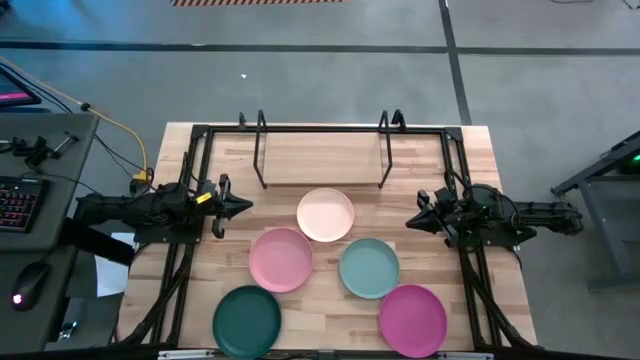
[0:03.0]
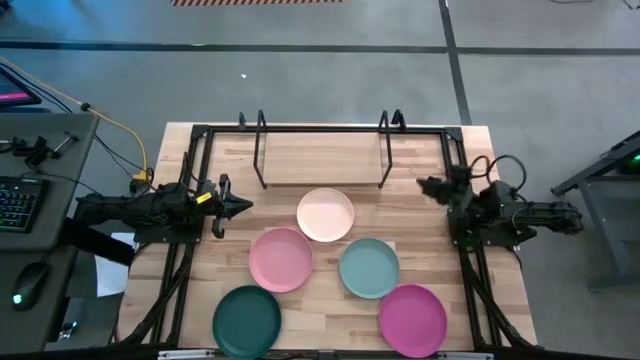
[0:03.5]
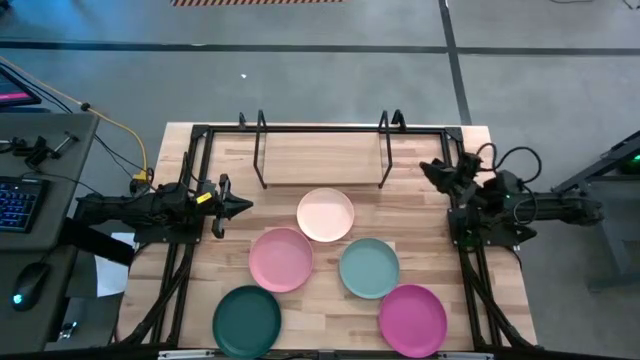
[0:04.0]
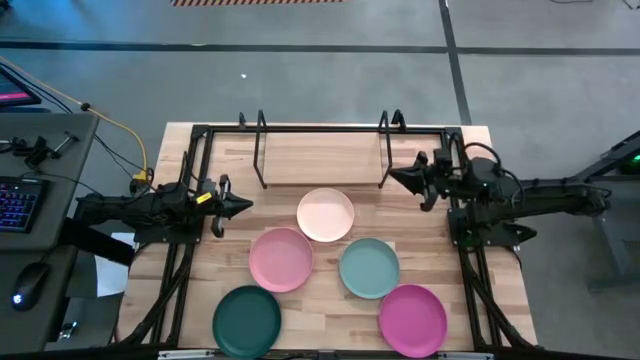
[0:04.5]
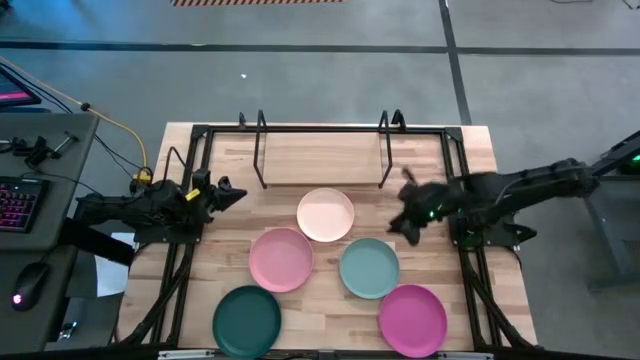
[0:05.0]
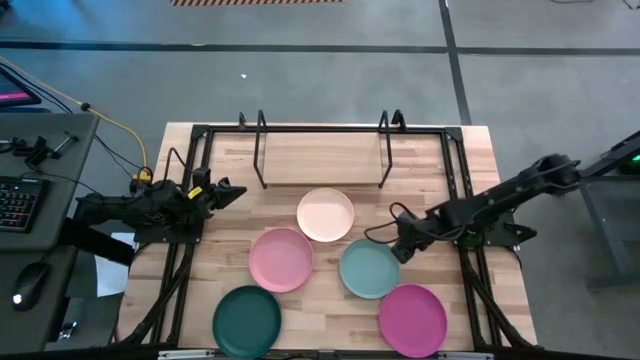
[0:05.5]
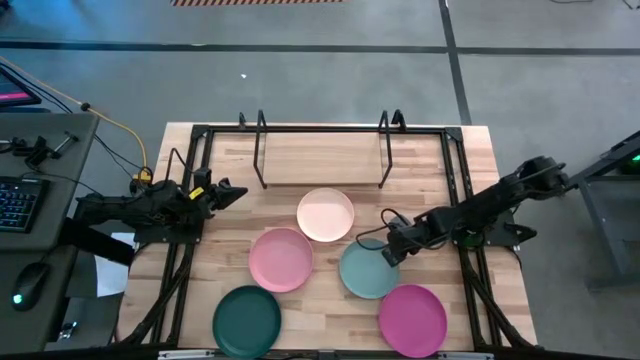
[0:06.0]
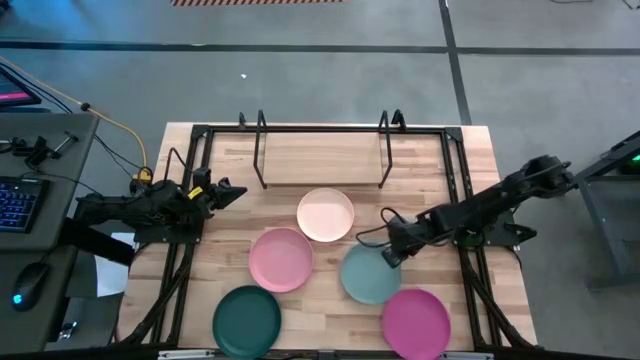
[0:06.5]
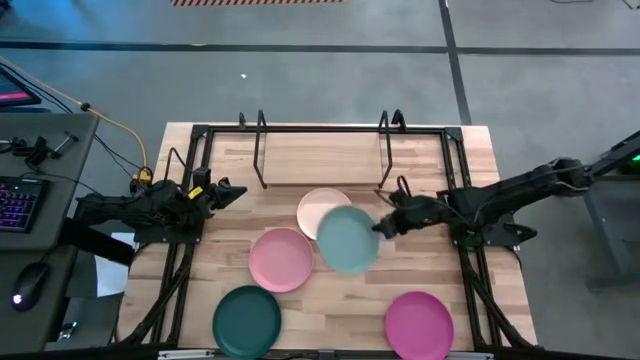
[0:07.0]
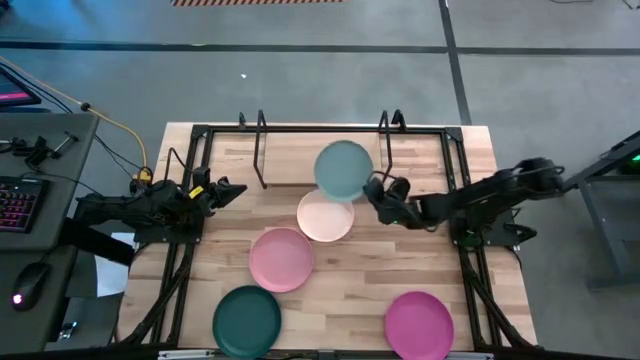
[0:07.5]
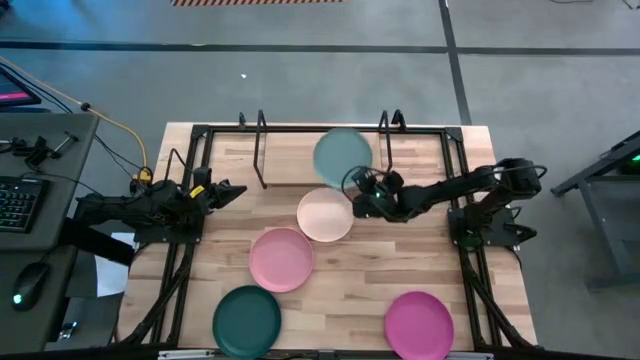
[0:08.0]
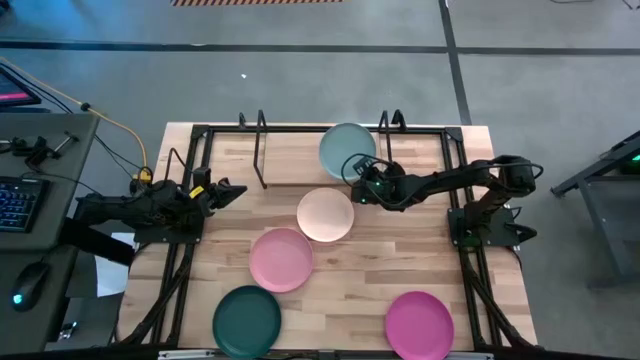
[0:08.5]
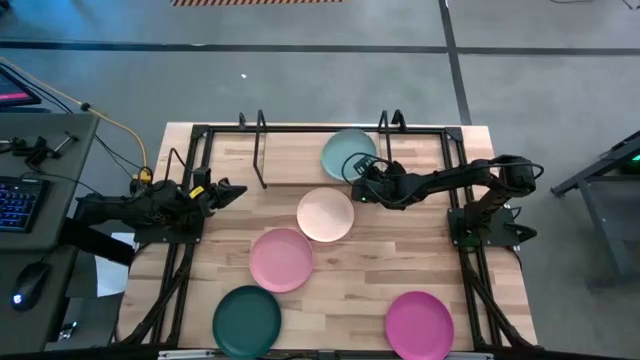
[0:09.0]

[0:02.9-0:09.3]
Task: Place and stack plates onto a shelf
Put the light blue plate on the shelf

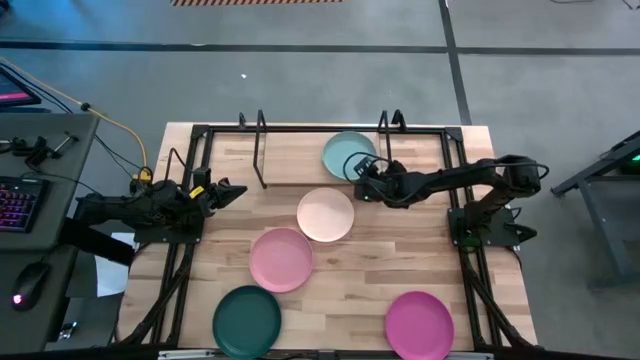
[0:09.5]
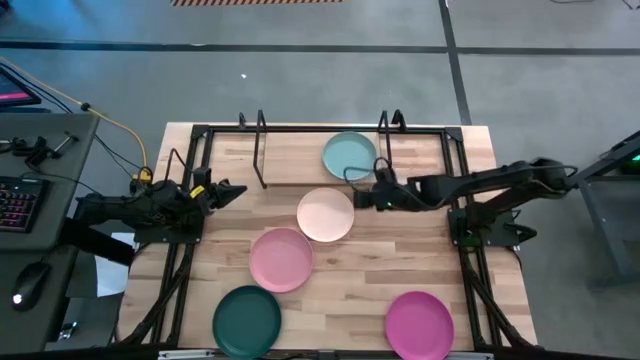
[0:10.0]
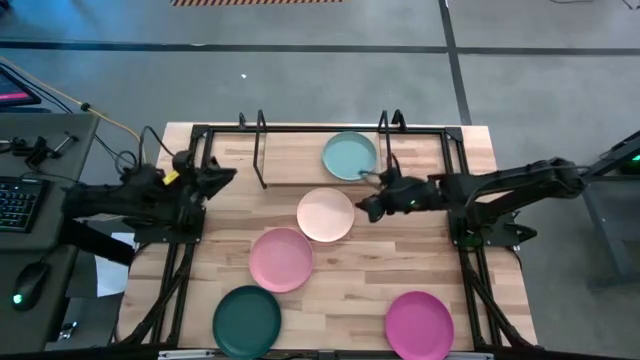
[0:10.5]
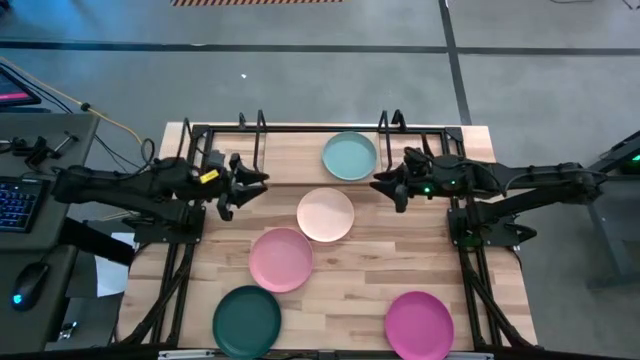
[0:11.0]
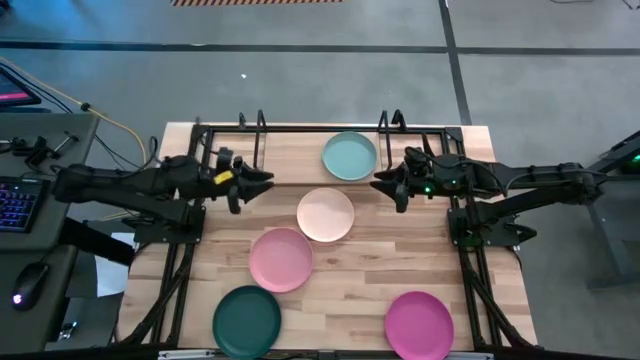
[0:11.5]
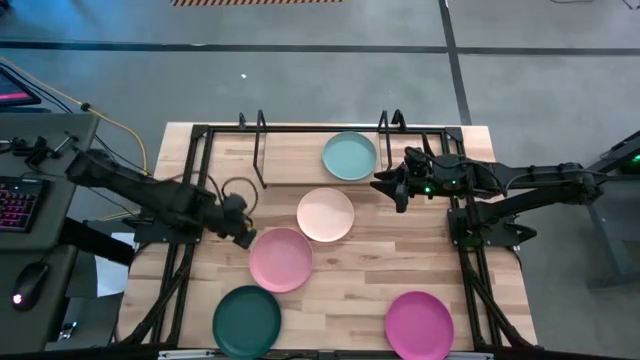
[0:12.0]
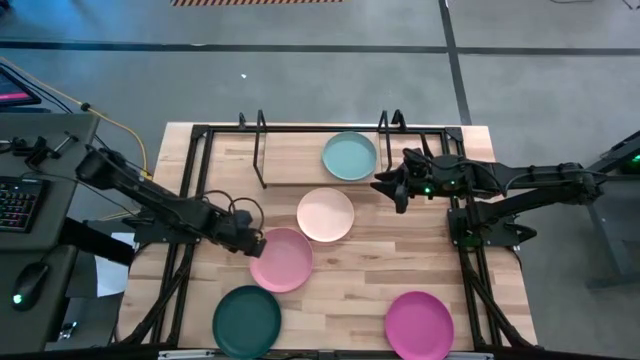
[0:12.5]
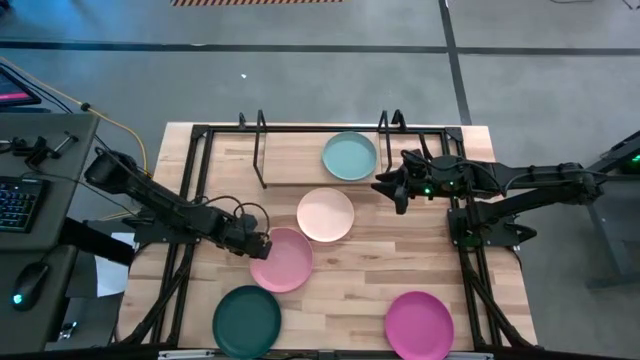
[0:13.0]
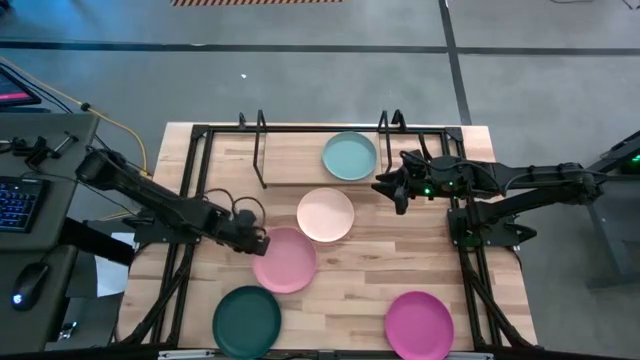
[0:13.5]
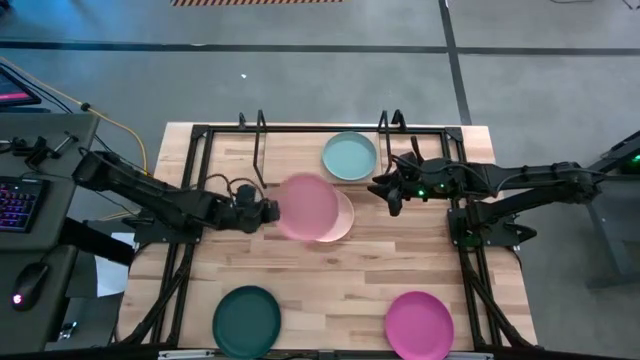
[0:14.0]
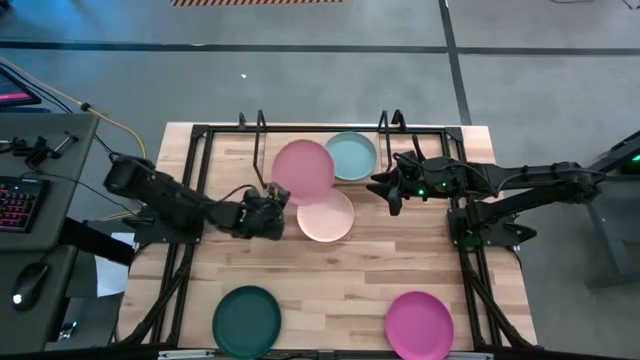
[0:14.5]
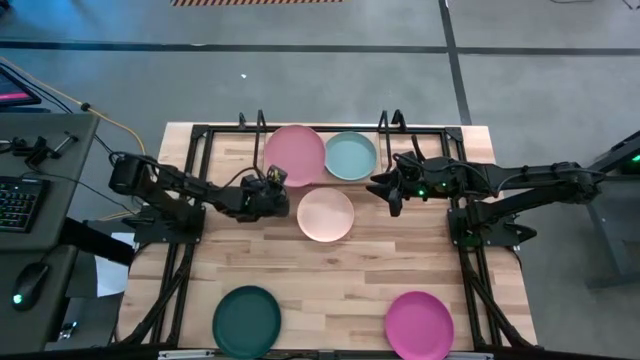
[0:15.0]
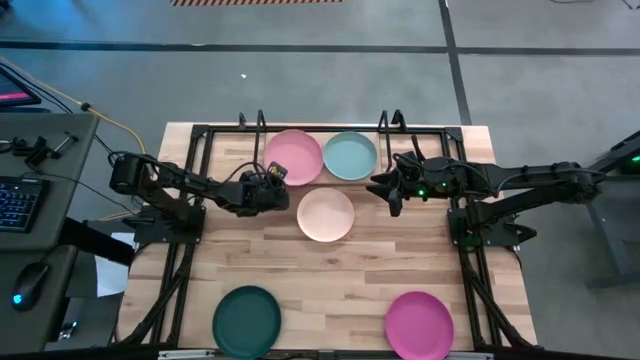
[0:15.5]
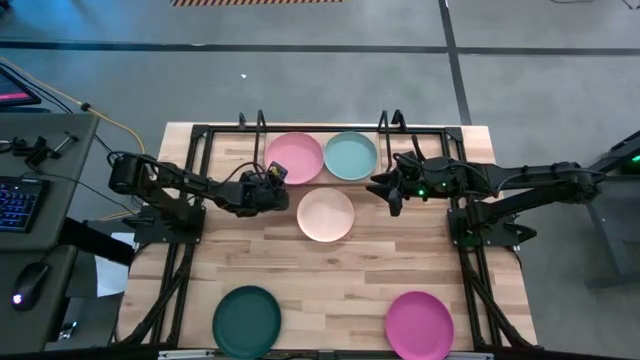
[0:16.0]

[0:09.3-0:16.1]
Put the pink plate on the shelf

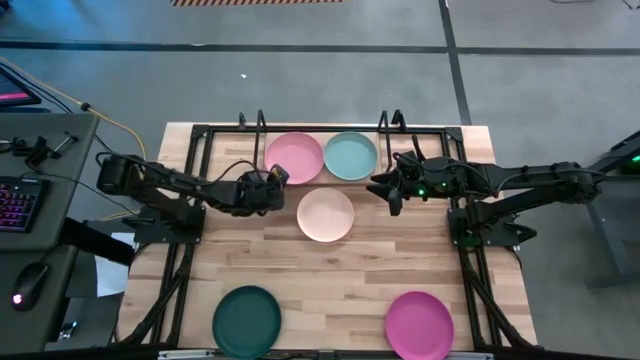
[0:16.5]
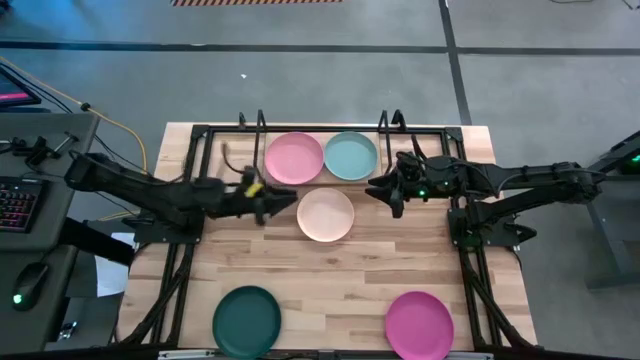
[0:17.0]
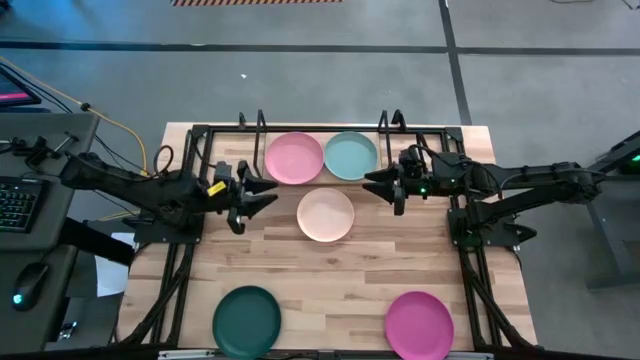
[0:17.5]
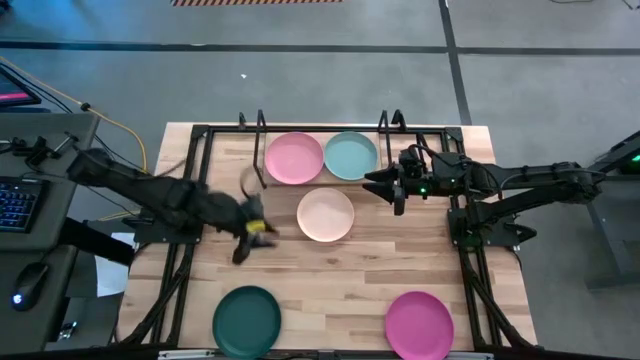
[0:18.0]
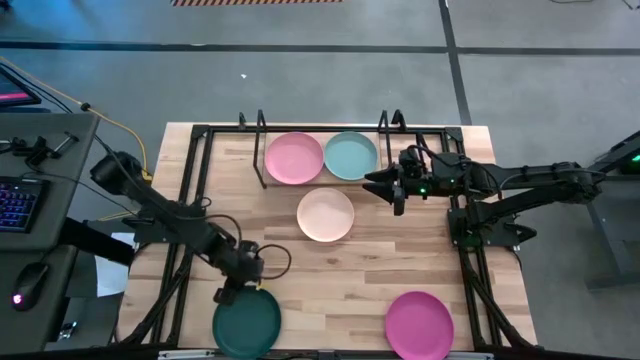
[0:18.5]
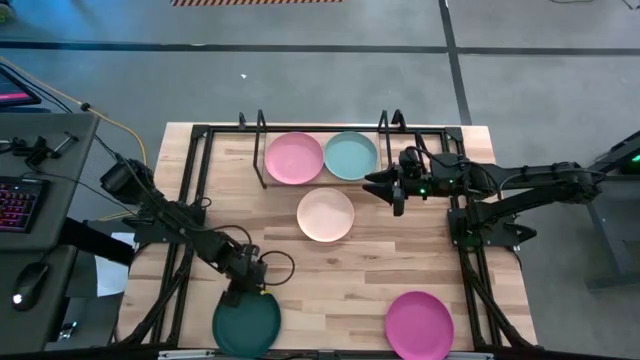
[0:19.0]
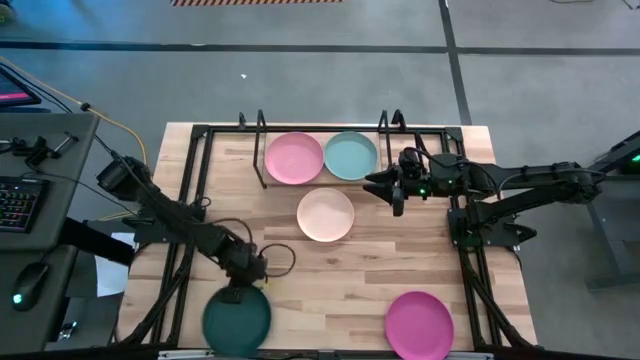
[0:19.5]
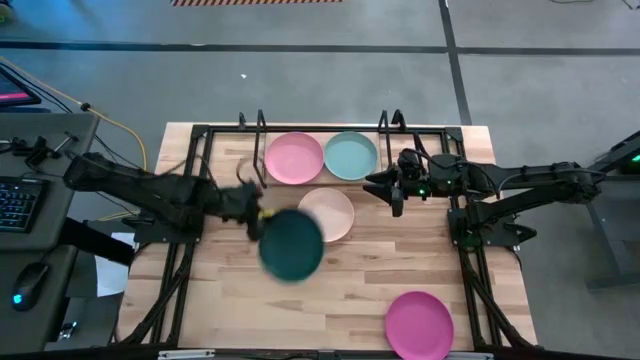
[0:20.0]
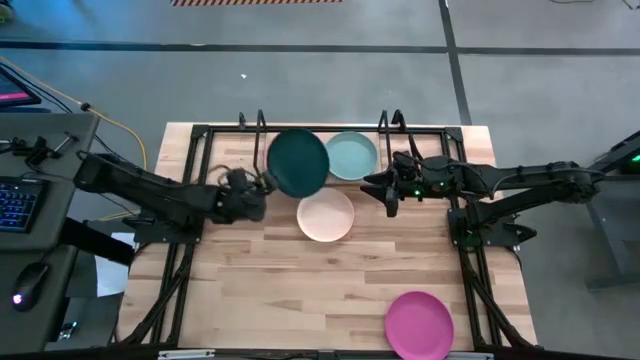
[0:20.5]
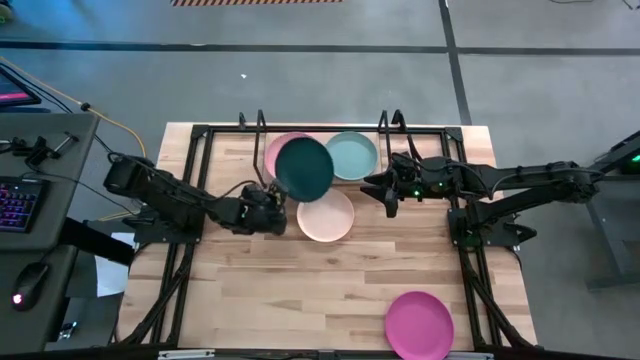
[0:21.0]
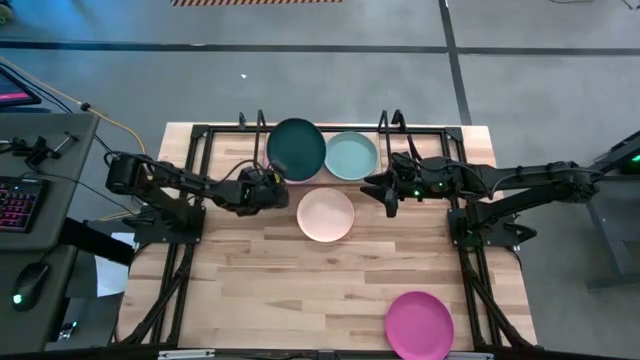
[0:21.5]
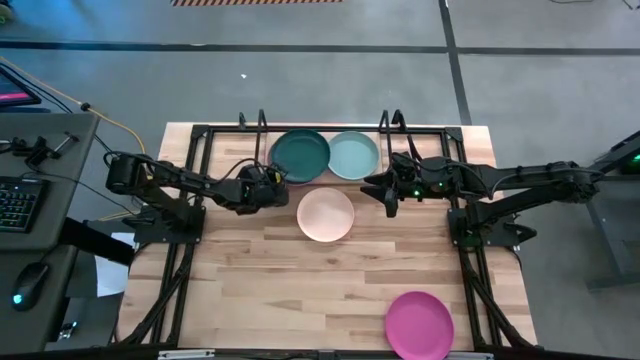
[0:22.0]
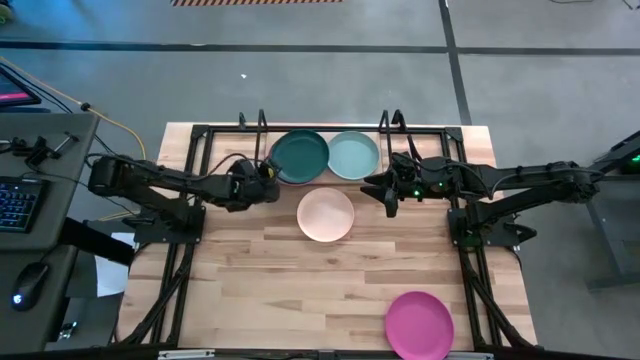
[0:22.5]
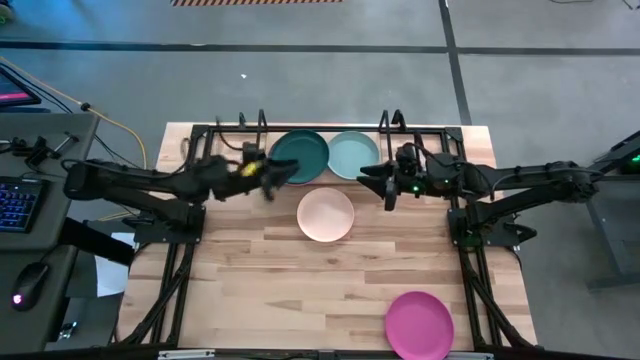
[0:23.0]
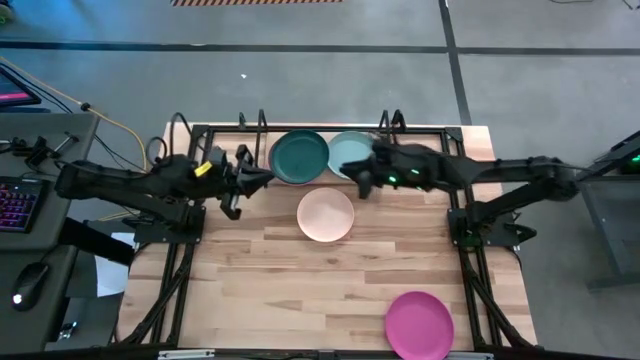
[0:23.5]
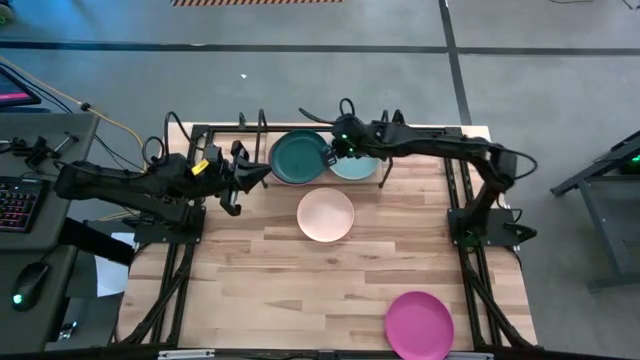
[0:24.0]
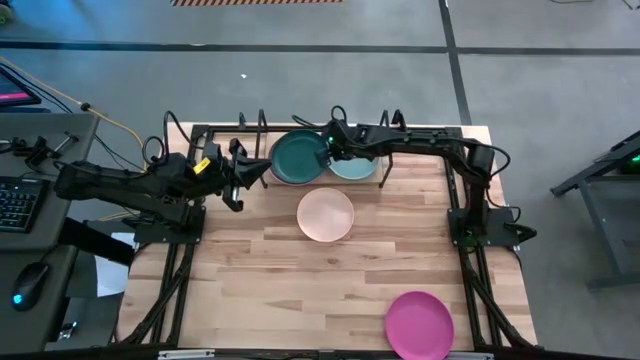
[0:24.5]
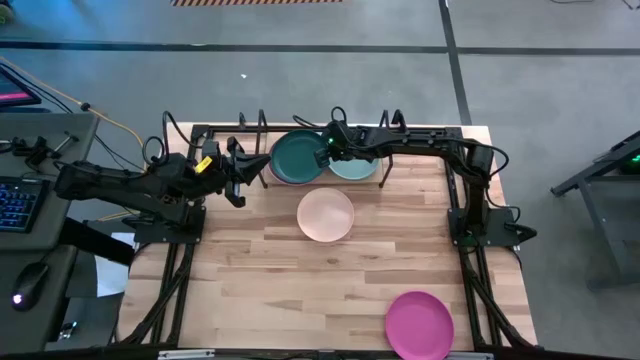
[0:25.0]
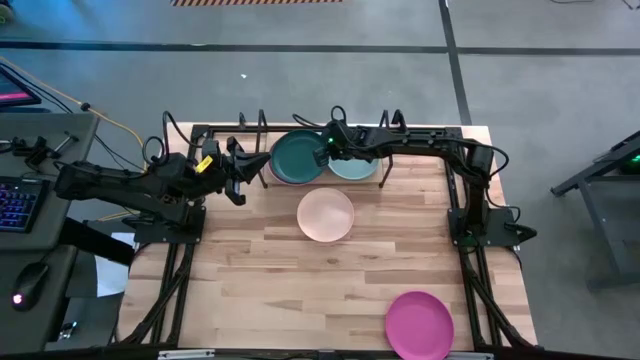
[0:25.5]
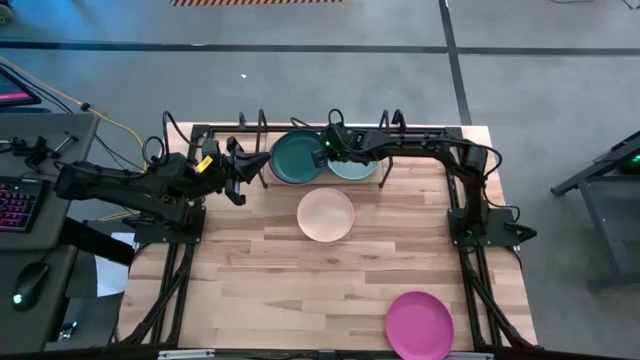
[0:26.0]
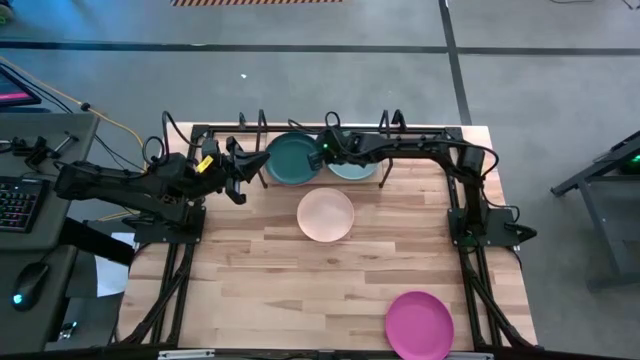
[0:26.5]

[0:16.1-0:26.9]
Stack the dark green plate on the pink plate on the shelf
